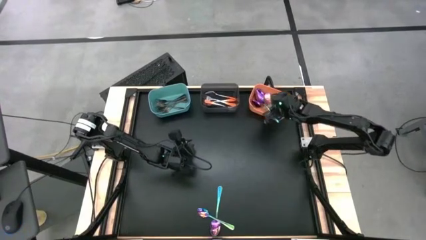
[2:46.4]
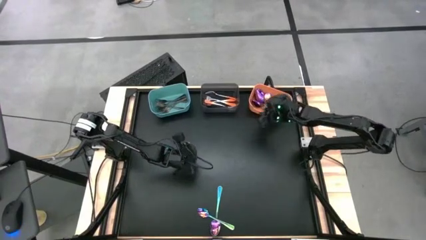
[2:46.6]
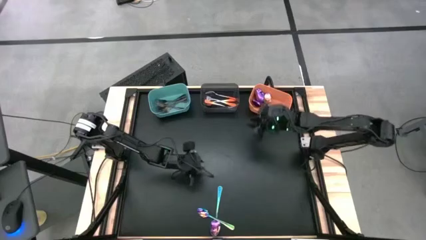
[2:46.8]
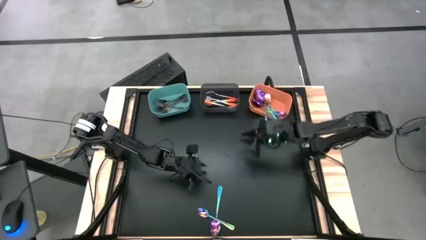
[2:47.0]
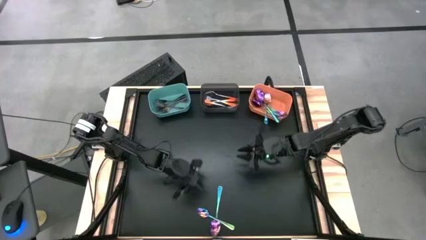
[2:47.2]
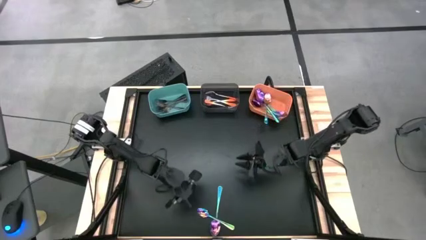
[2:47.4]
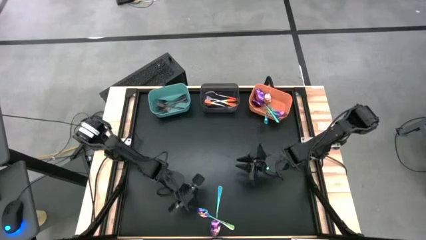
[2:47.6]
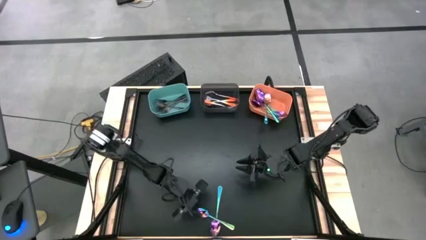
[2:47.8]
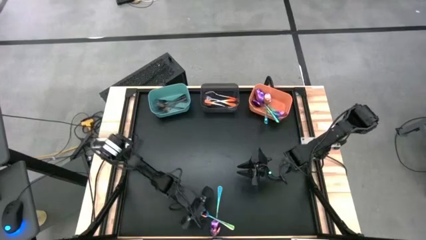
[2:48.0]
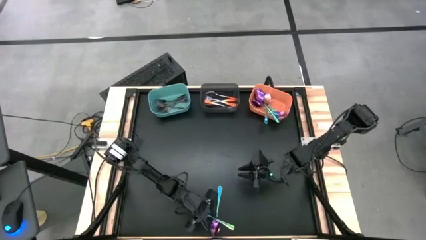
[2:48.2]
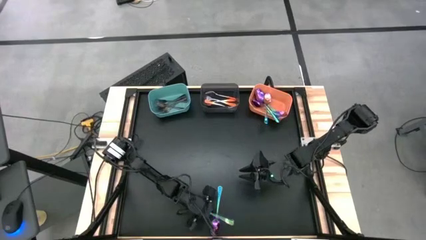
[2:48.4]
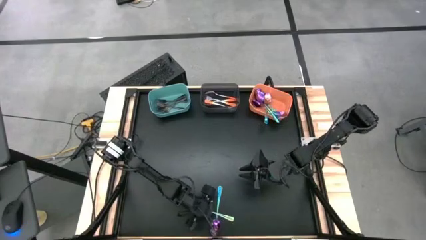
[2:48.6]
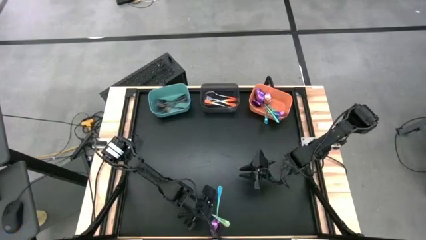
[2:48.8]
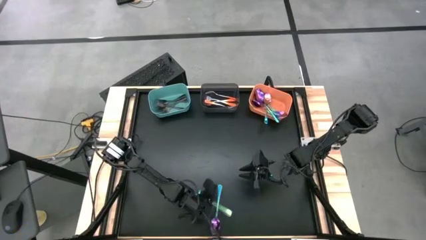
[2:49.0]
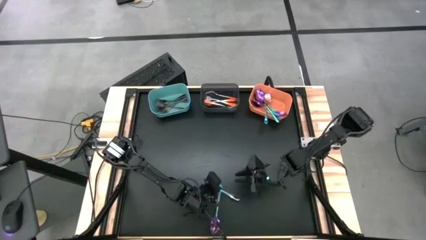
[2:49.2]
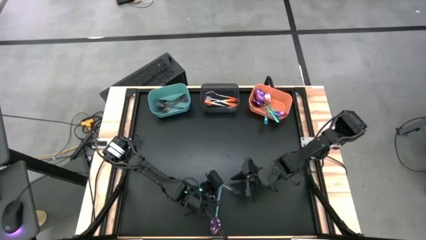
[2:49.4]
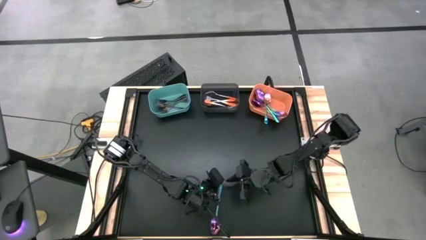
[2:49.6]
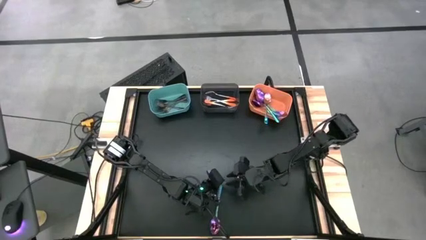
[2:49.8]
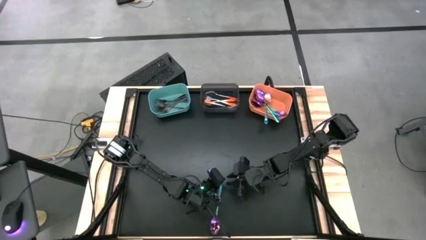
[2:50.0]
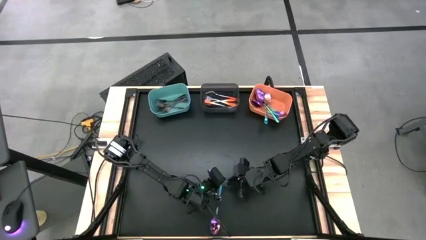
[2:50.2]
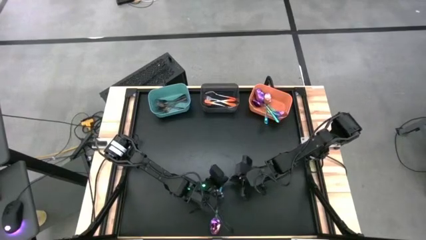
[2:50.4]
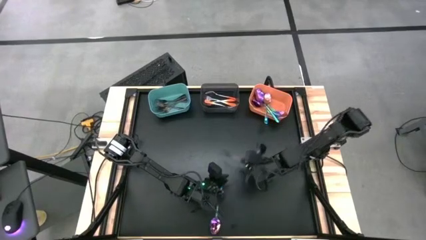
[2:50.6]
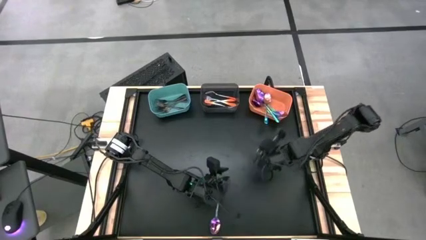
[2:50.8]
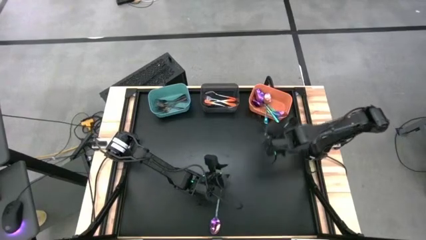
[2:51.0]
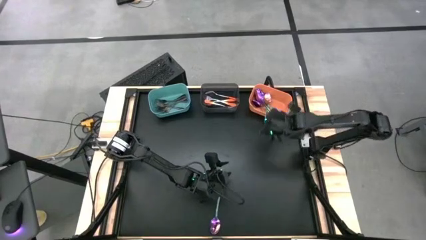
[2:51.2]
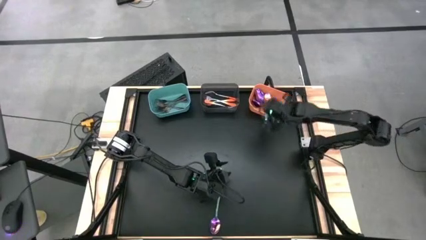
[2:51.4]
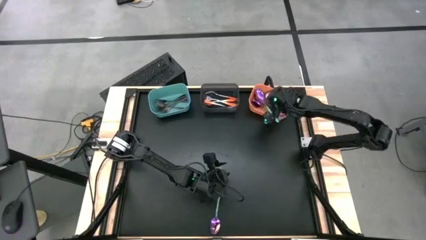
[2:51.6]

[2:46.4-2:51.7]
Task: Sort silverware by color (type)
Put the blue spoon into the orange bin

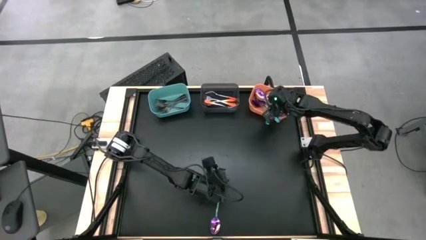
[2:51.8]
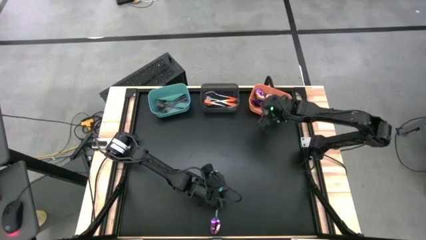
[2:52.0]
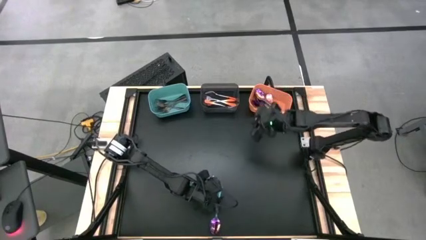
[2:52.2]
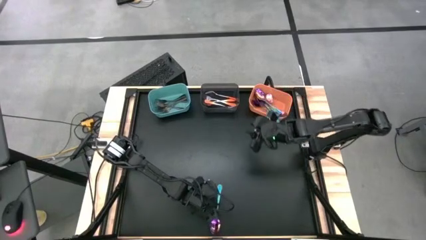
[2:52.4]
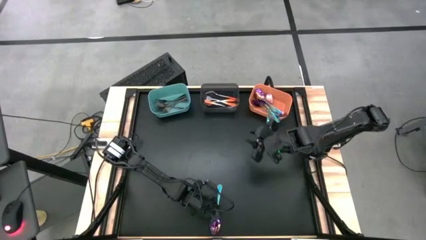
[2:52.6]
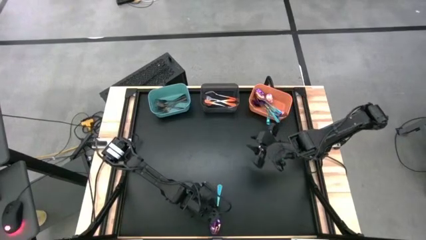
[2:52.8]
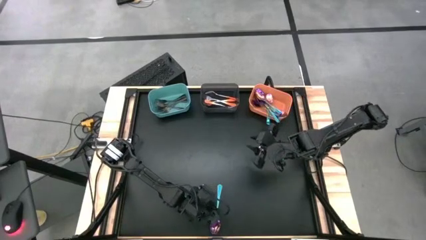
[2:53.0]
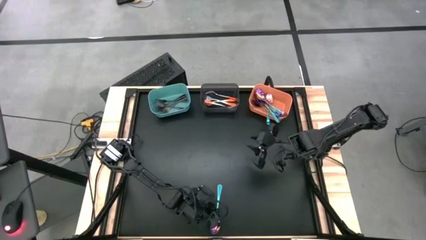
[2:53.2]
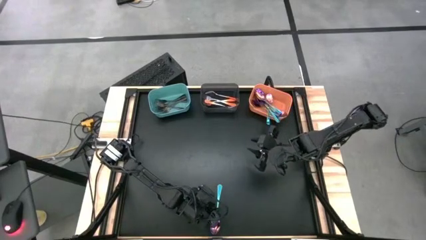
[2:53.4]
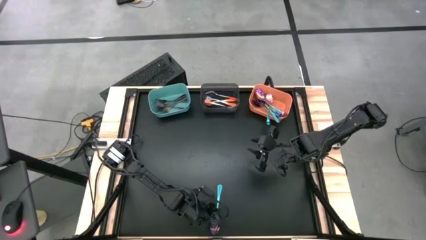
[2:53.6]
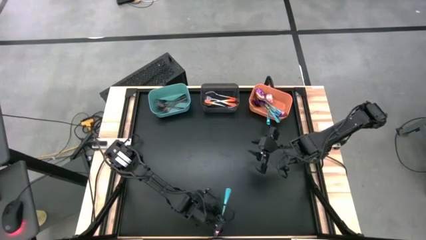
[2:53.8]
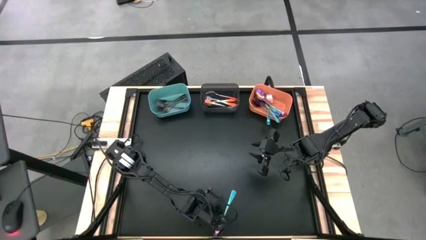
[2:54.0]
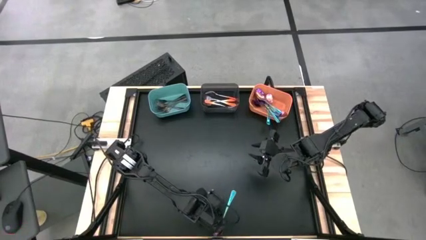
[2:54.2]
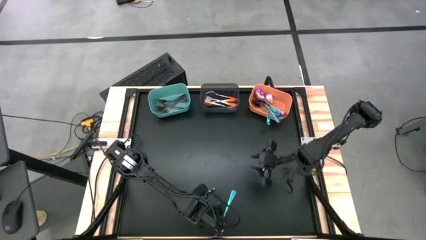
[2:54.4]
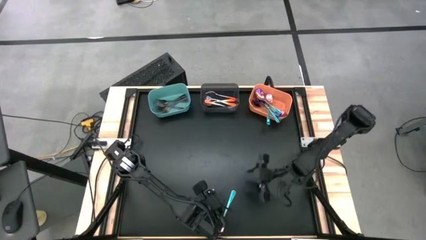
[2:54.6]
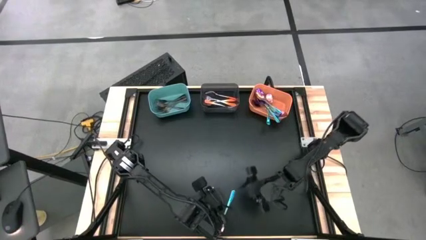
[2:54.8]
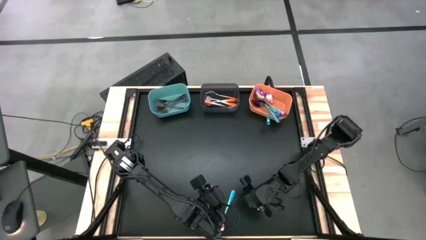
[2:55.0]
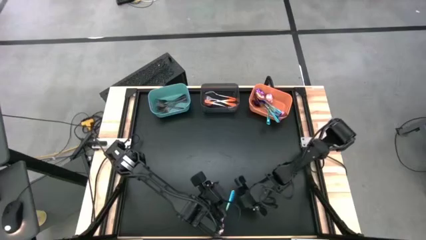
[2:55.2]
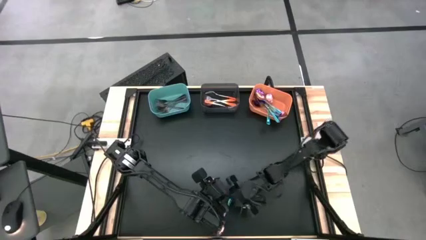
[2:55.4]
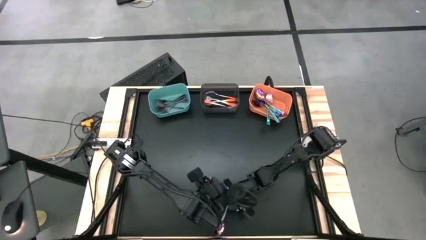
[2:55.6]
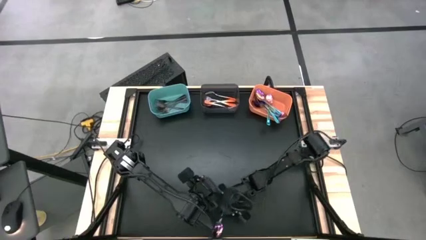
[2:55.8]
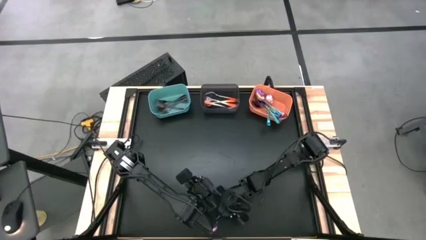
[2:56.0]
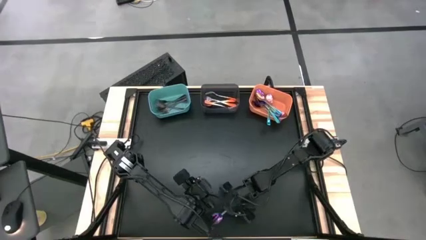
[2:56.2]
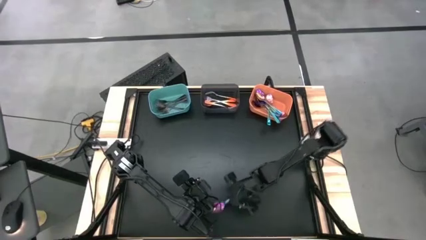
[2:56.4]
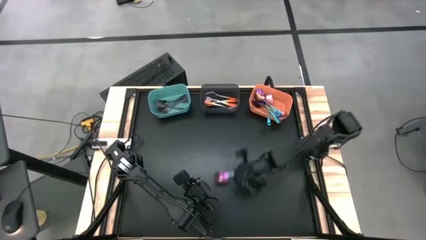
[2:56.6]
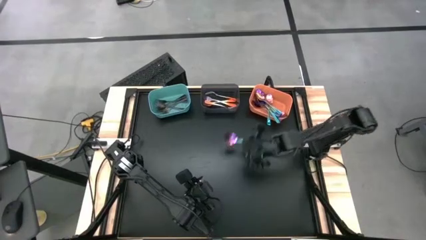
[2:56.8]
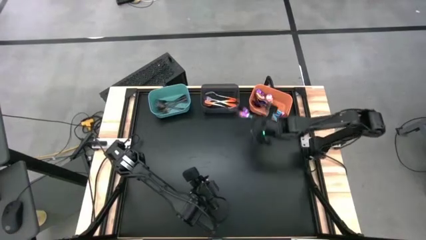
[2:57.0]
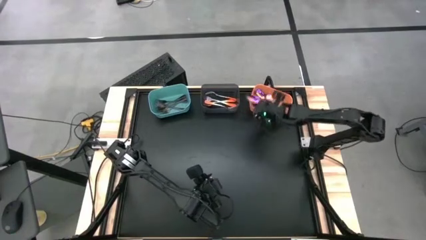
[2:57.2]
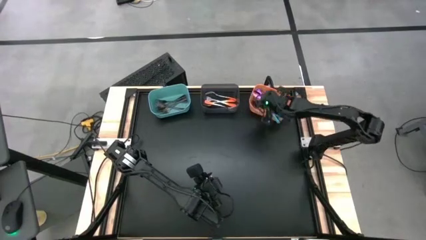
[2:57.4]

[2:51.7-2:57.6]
Put the blue spoon into the orange bin

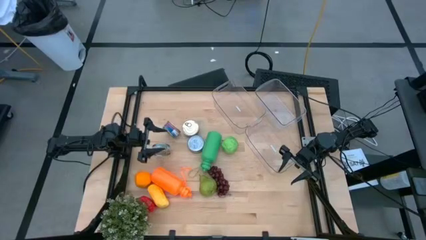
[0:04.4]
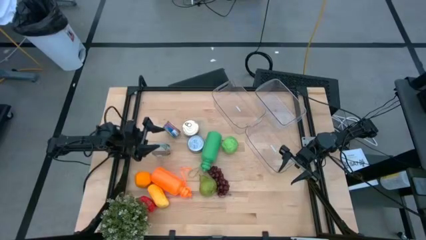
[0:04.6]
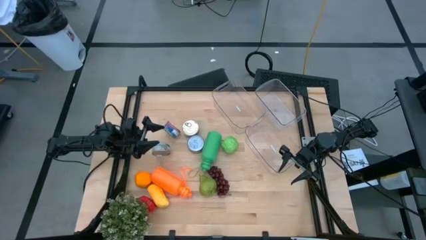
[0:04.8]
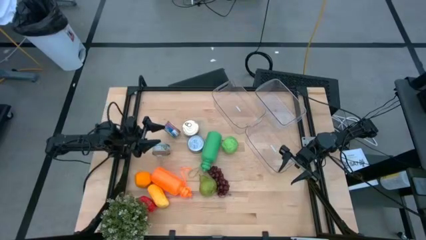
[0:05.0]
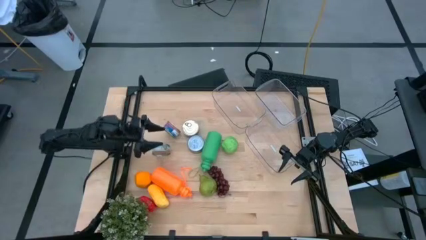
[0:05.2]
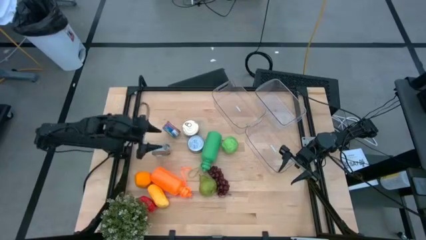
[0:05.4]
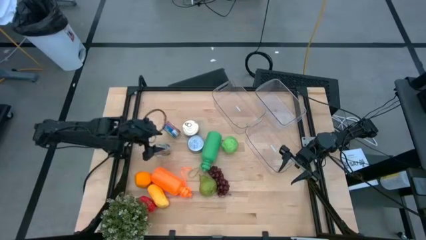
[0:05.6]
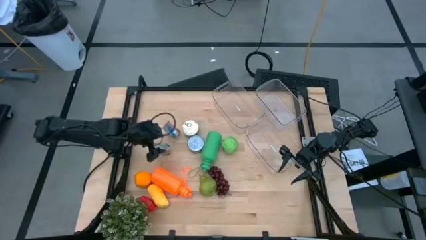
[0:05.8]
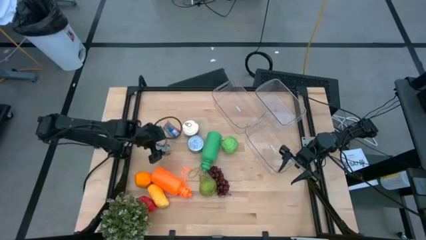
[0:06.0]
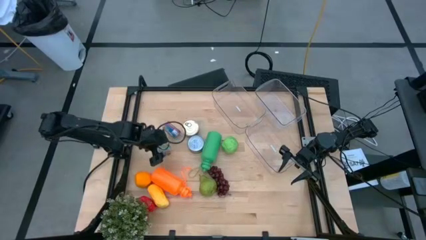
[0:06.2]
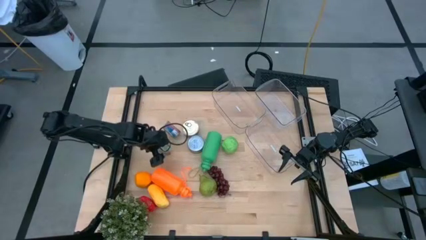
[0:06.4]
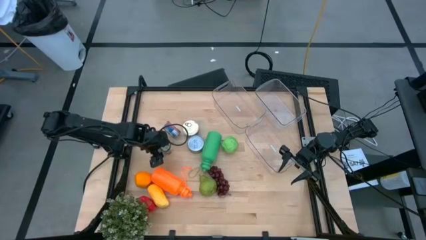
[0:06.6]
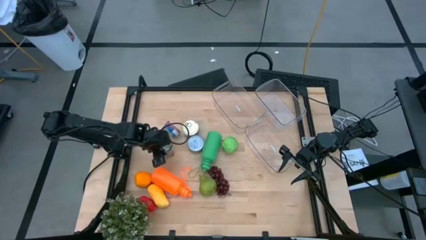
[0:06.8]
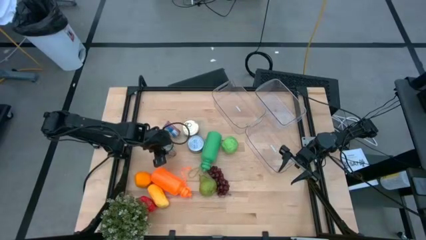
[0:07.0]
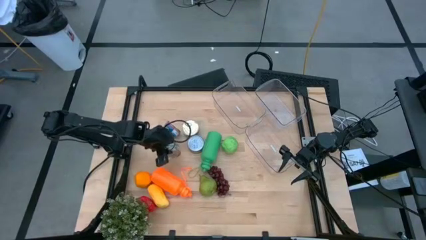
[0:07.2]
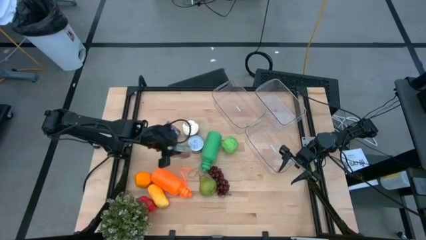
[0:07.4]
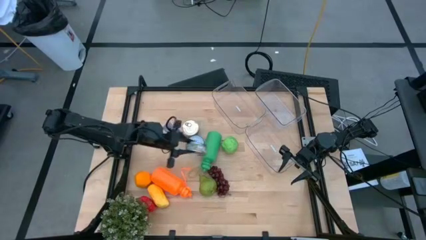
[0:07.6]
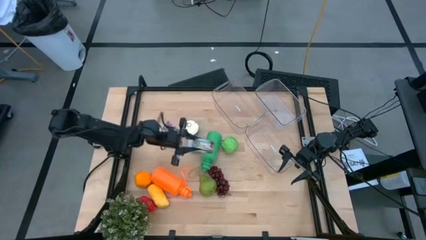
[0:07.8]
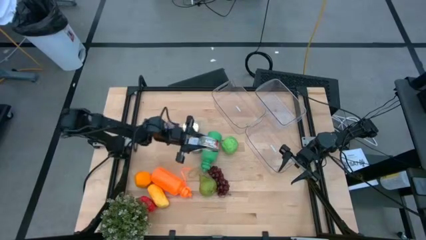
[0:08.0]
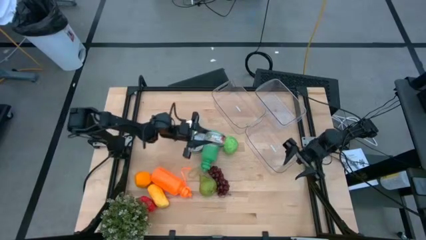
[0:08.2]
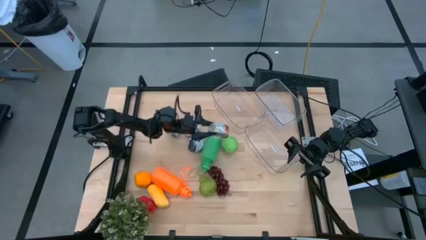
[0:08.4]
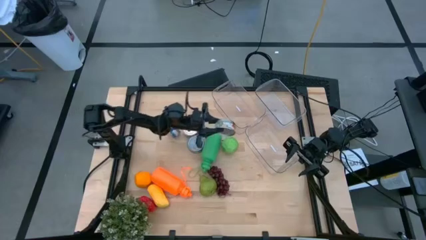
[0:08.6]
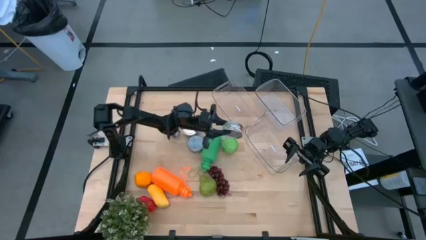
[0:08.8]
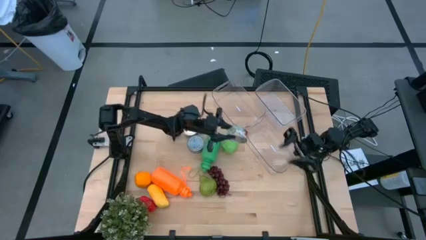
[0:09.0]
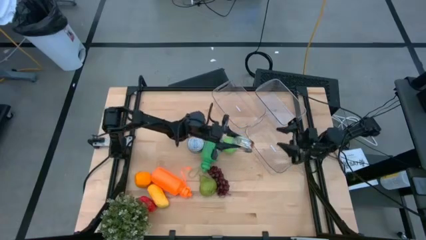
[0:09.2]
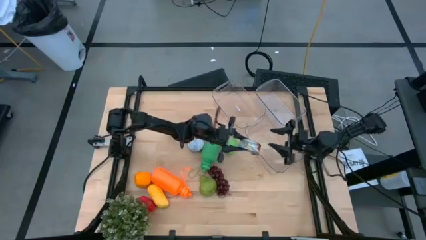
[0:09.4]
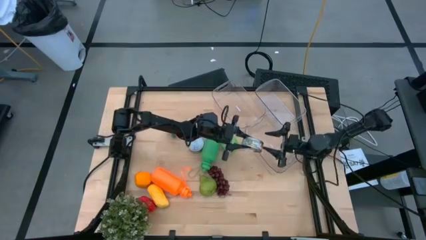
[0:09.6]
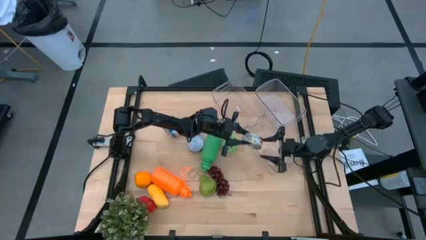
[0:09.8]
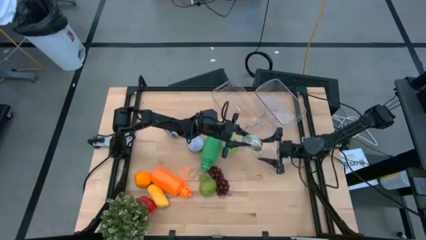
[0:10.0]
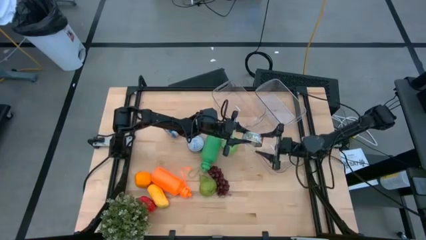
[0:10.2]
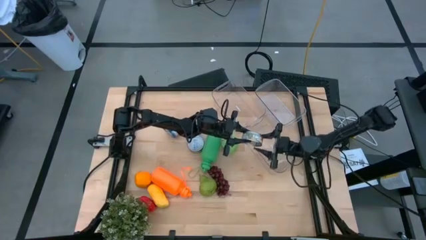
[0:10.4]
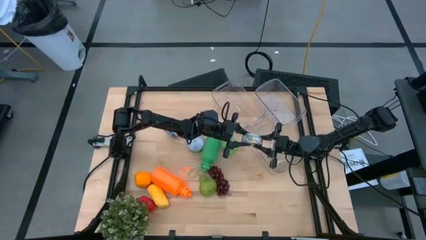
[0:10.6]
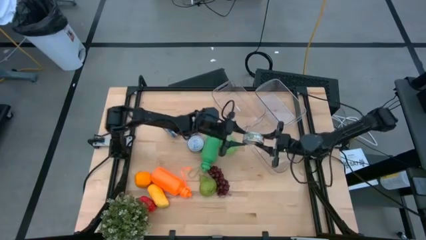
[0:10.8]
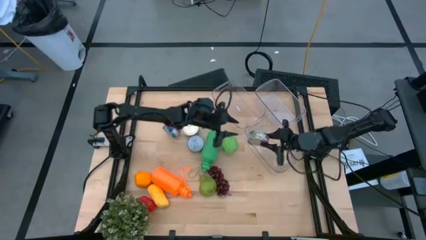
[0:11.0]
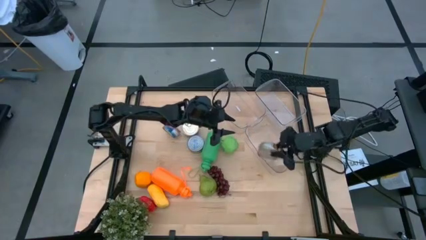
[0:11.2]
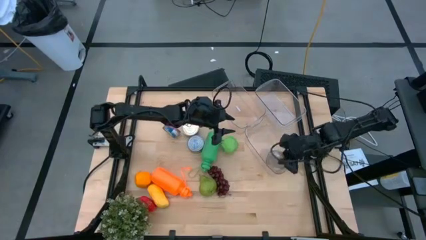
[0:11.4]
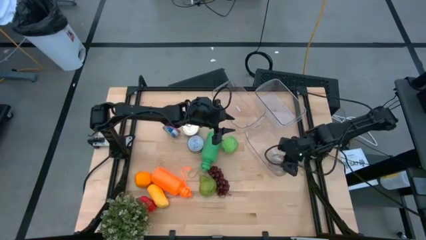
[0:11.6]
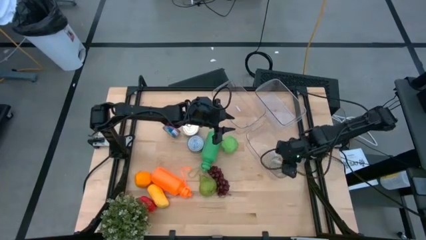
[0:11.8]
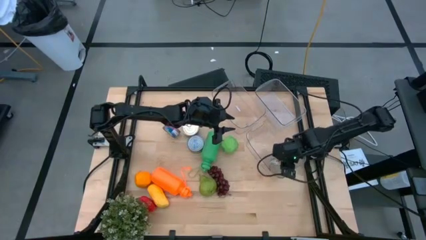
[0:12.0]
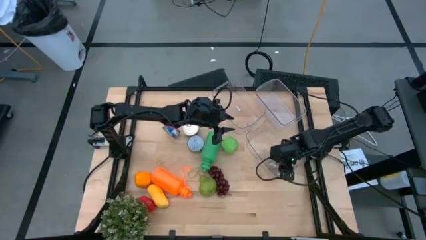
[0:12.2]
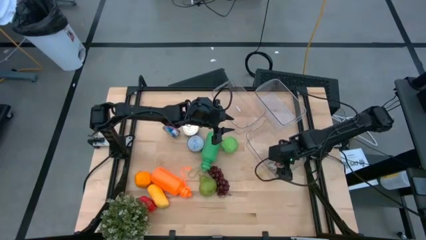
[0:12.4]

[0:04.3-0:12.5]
Task: Pick & Place Food Item
Put the left green tuna can into the bottom transparent bin
